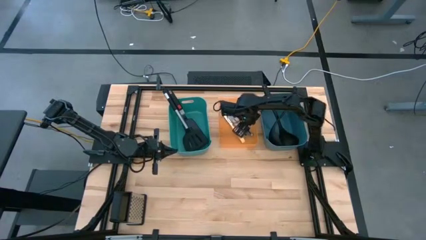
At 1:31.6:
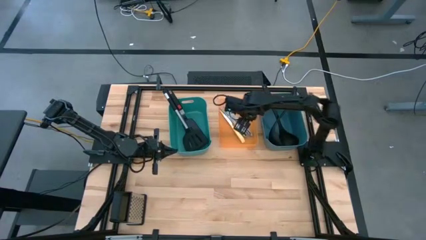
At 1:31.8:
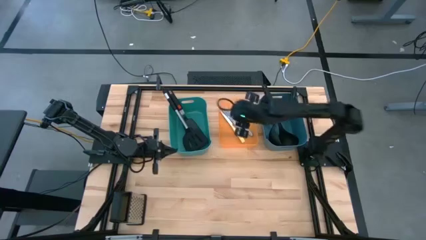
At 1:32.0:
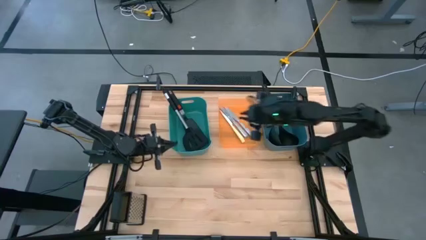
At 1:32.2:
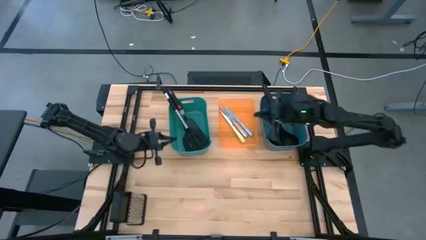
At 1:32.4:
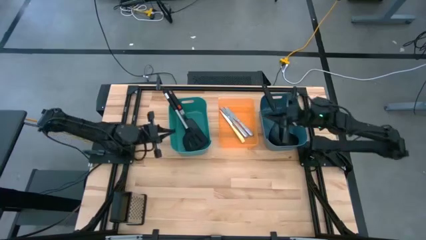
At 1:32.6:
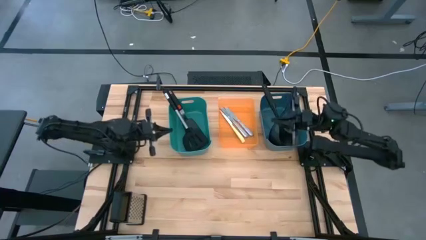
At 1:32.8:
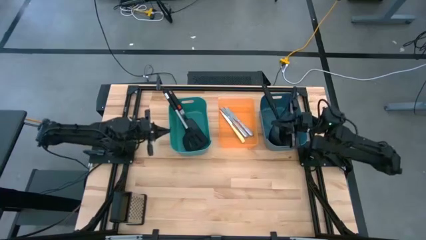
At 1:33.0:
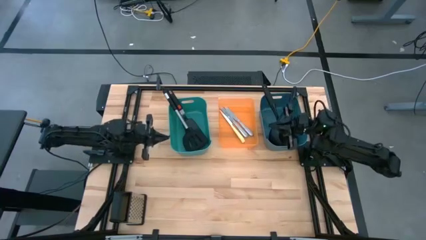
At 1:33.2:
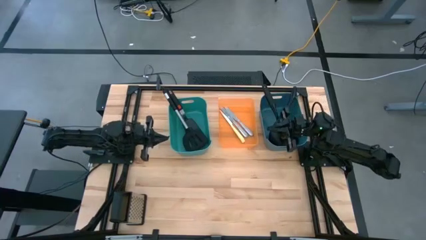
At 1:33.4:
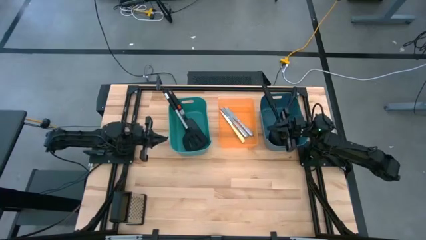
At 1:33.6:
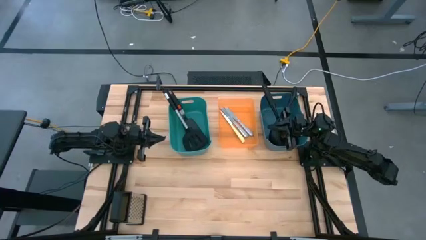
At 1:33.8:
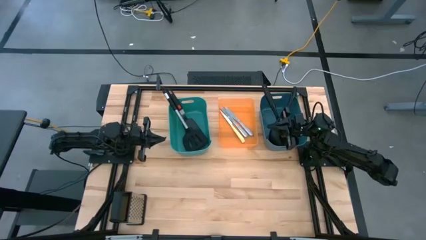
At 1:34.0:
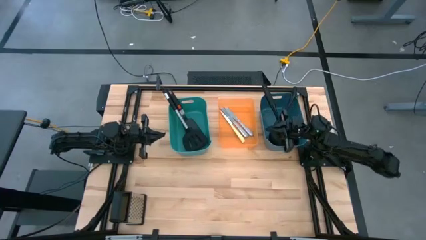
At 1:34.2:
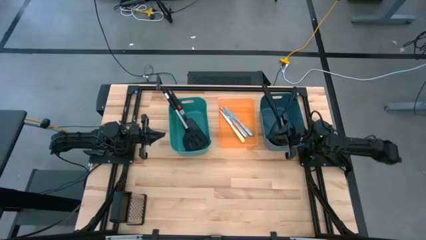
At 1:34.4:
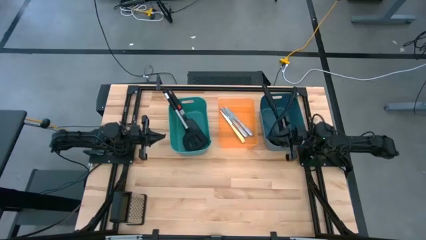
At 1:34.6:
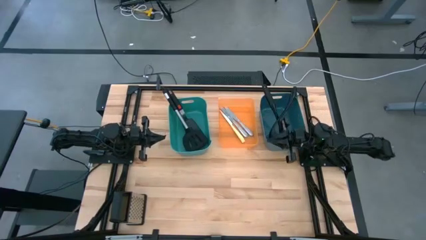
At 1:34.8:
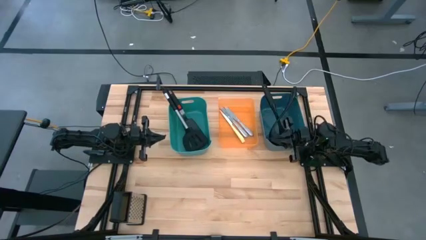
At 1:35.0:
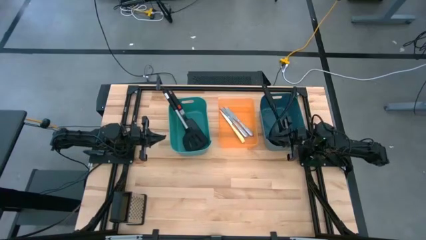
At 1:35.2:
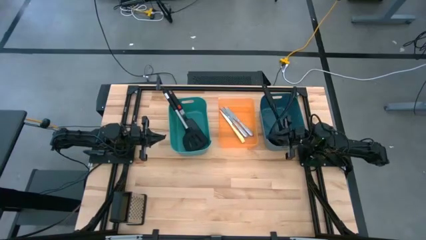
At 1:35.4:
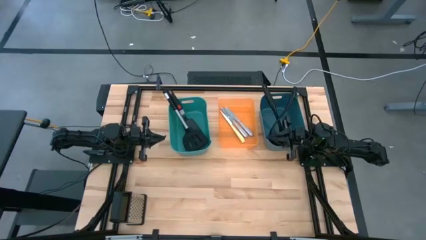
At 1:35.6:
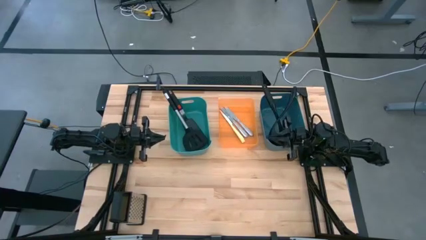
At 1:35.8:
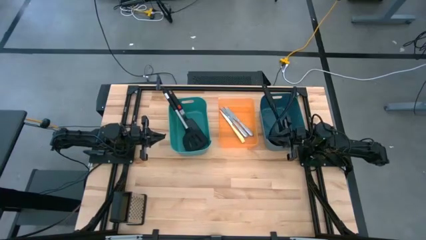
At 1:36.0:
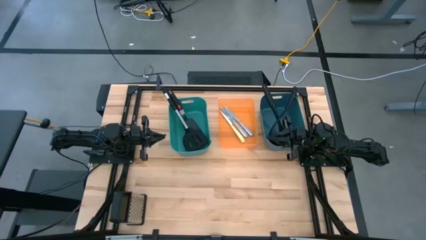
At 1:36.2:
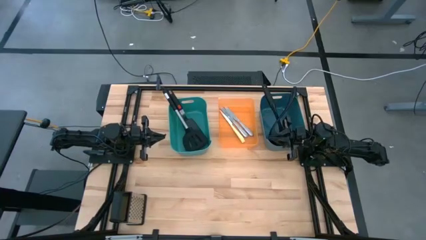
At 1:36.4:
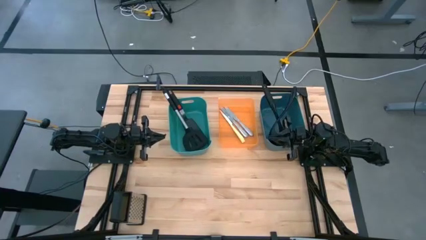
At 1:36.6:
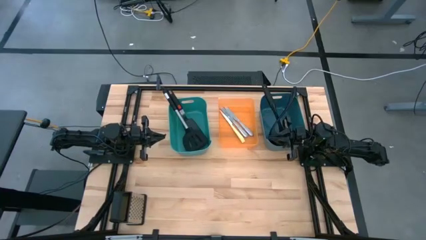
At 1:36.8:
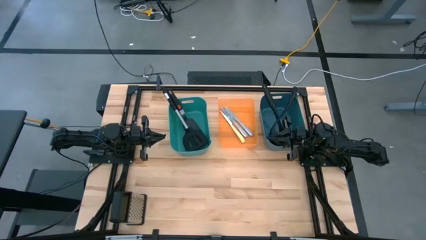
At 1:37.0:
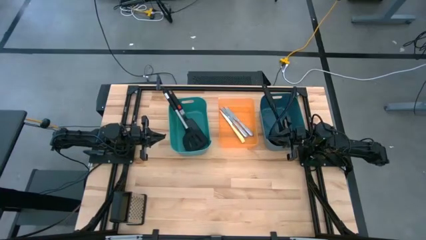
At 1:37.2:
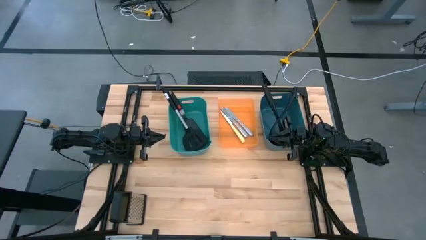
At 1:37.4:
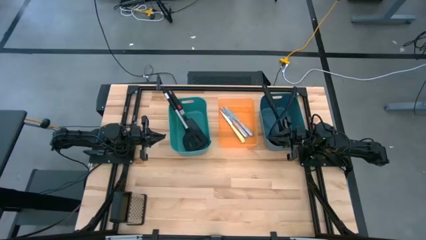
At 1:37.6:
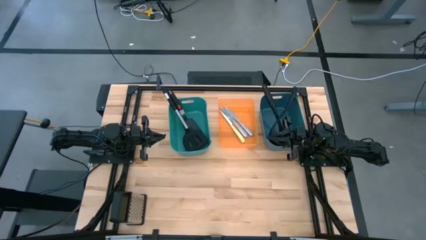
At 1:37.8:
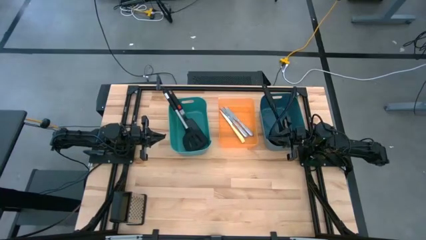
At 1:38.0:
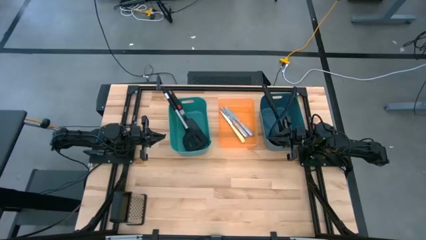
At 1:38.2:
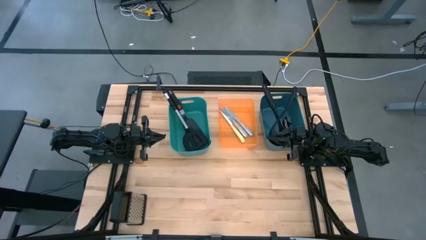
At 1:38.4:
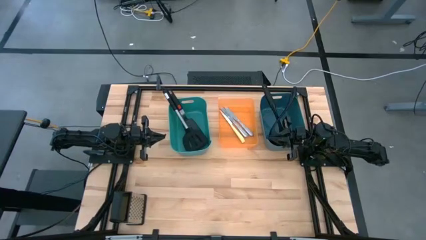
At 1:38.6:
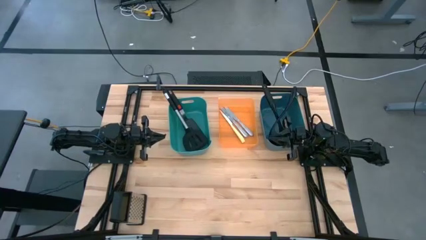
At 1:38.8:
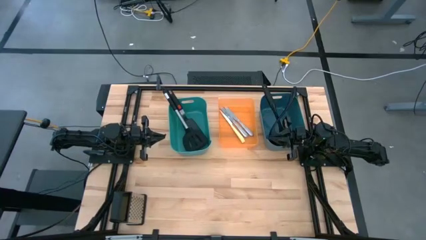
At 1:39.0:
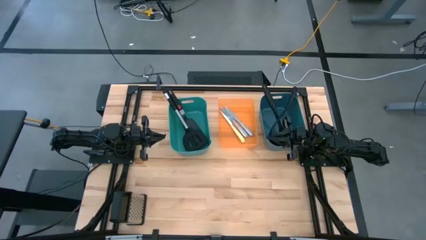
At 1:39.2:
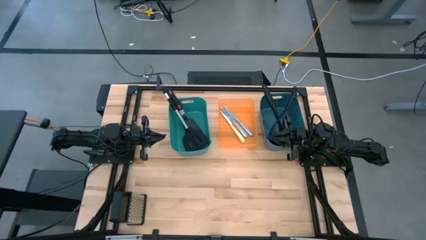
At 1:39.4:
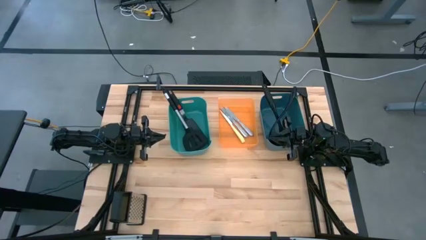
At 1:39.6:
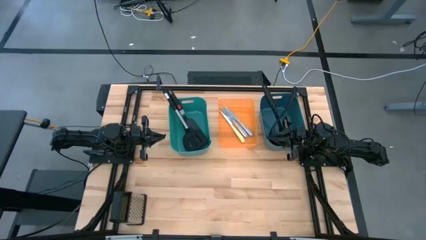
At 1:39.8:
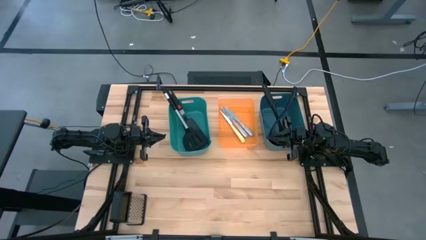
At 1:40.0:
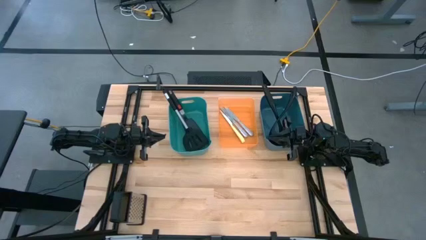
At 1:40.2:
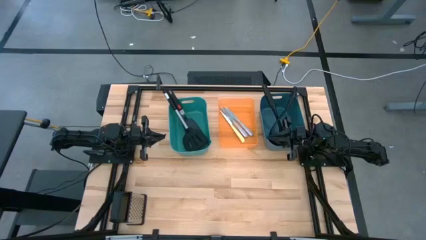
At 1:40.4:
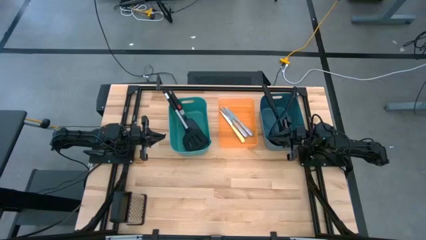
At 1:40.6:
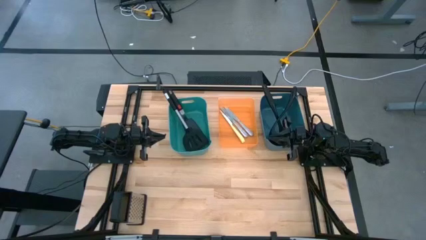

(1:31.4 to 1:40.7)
Task: Pick & Place Kitchen Items
Return to Home Position

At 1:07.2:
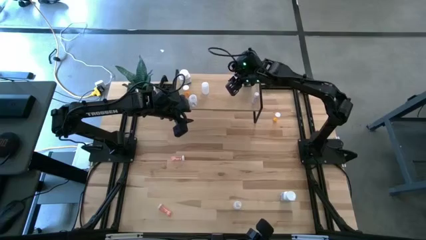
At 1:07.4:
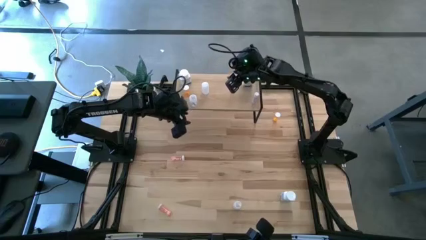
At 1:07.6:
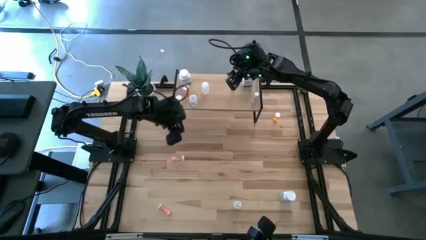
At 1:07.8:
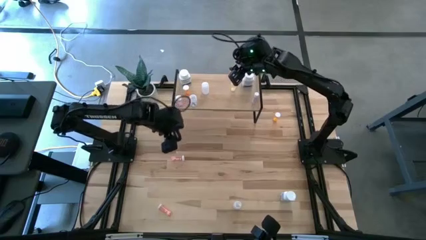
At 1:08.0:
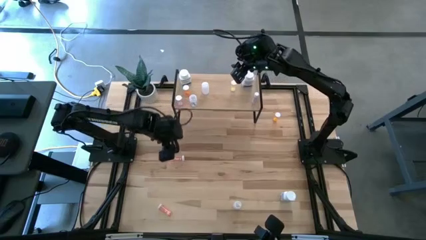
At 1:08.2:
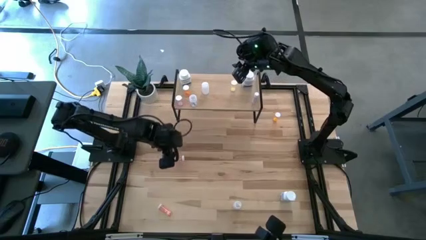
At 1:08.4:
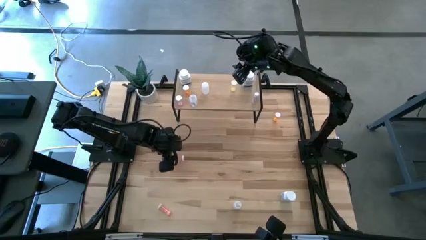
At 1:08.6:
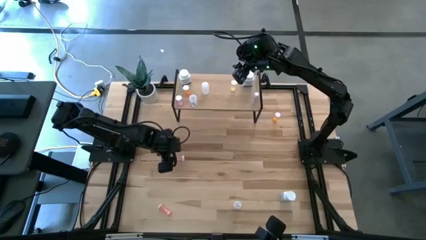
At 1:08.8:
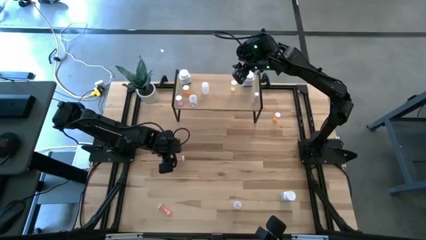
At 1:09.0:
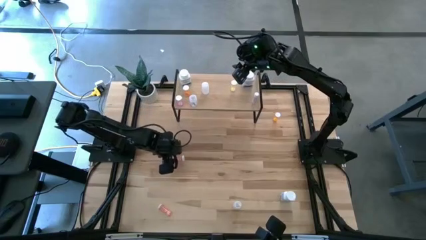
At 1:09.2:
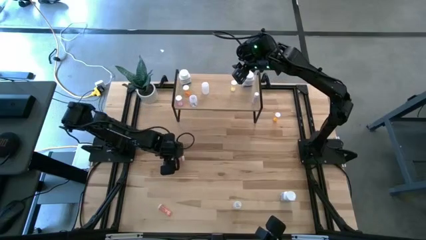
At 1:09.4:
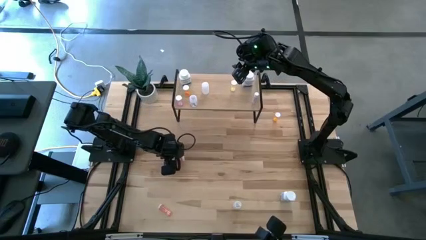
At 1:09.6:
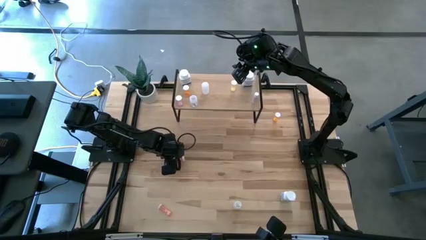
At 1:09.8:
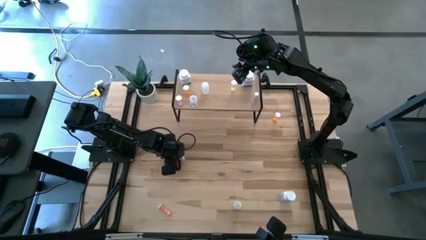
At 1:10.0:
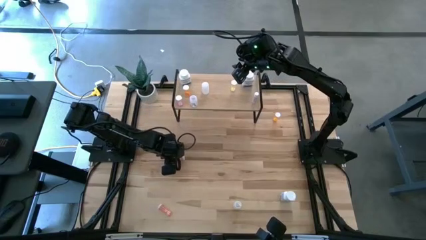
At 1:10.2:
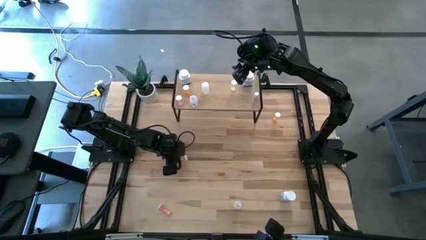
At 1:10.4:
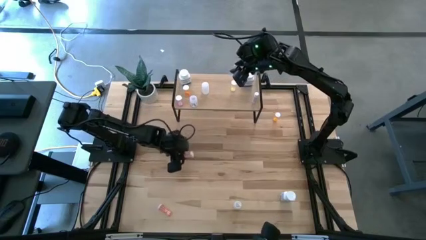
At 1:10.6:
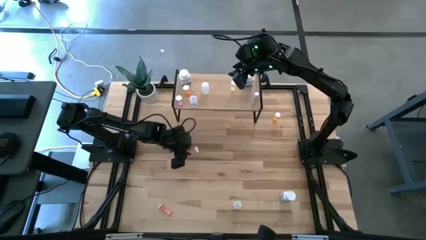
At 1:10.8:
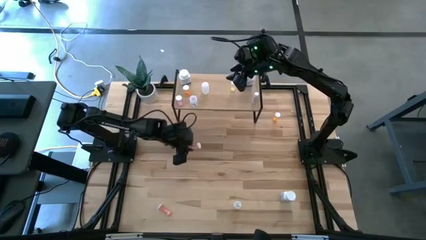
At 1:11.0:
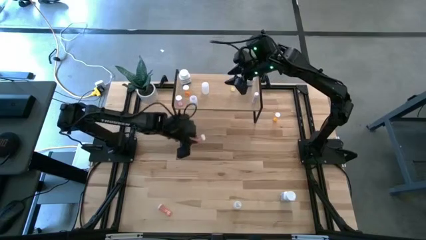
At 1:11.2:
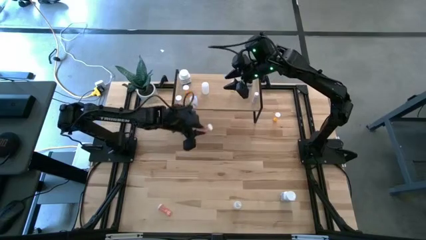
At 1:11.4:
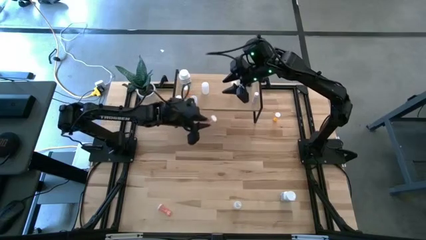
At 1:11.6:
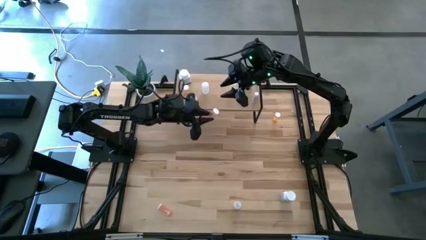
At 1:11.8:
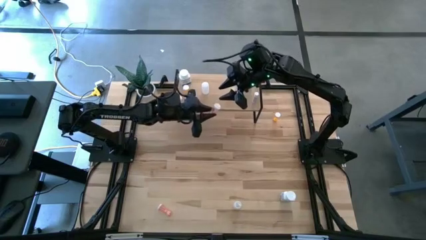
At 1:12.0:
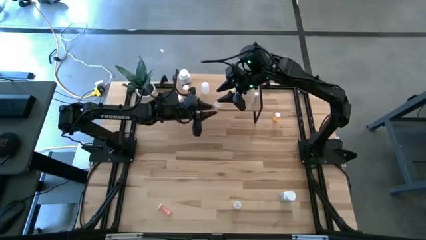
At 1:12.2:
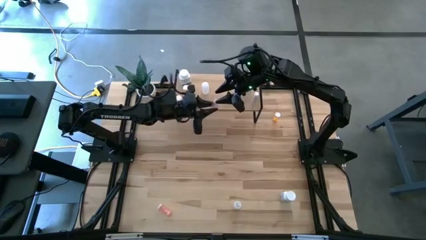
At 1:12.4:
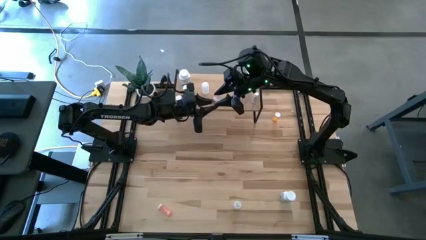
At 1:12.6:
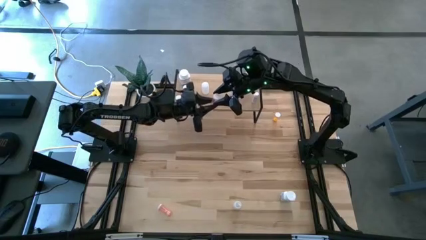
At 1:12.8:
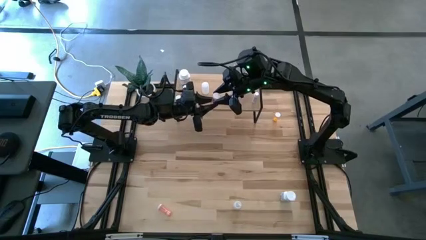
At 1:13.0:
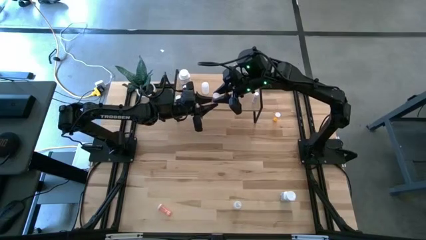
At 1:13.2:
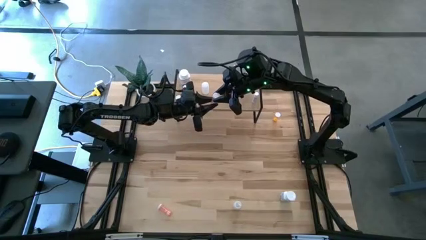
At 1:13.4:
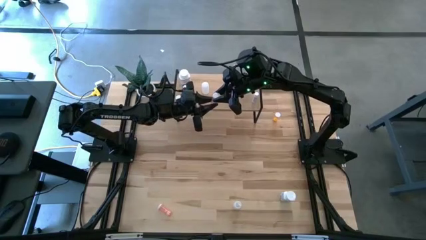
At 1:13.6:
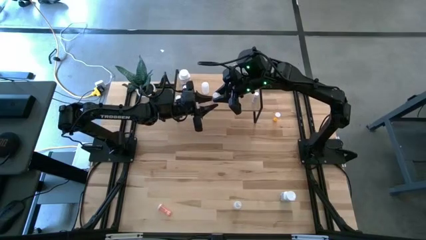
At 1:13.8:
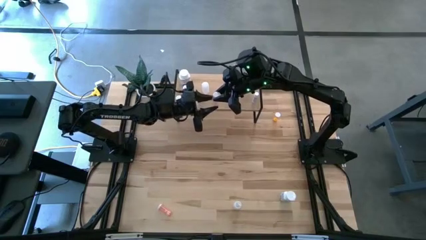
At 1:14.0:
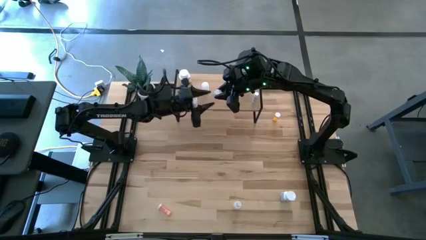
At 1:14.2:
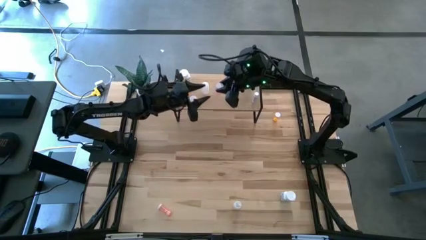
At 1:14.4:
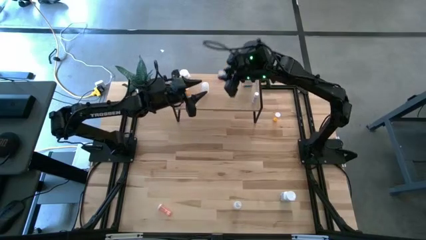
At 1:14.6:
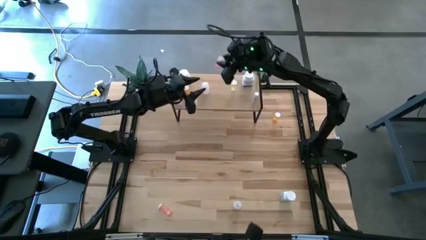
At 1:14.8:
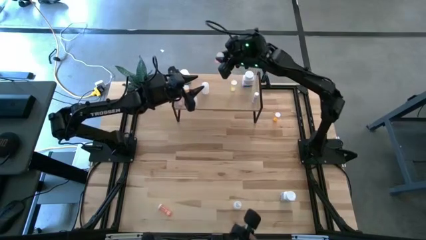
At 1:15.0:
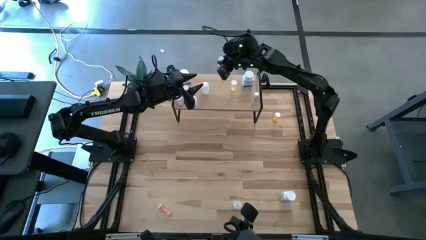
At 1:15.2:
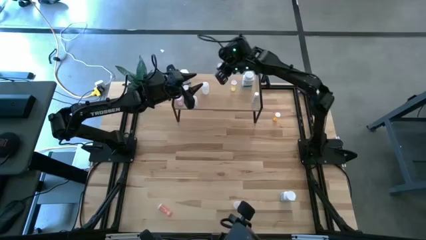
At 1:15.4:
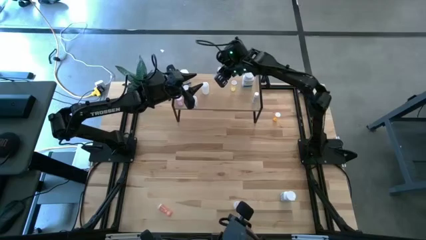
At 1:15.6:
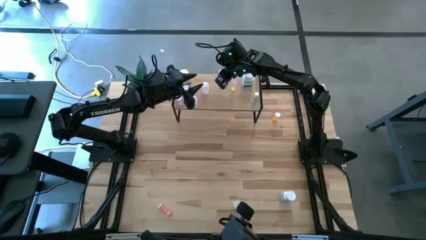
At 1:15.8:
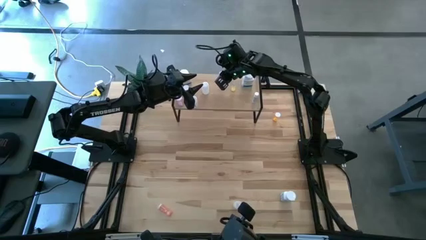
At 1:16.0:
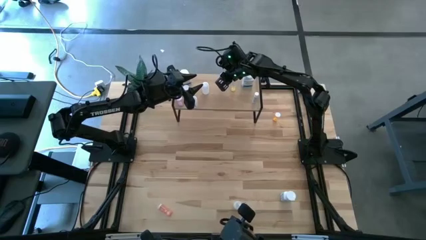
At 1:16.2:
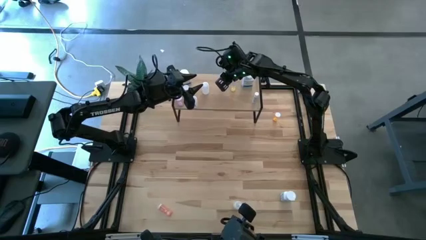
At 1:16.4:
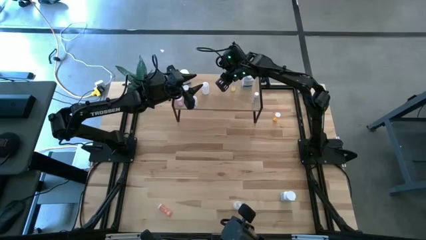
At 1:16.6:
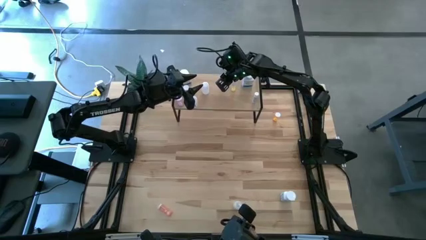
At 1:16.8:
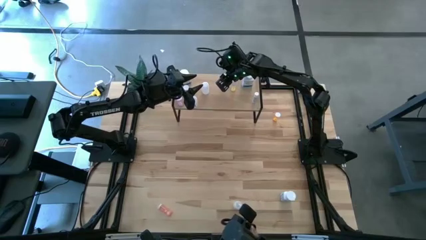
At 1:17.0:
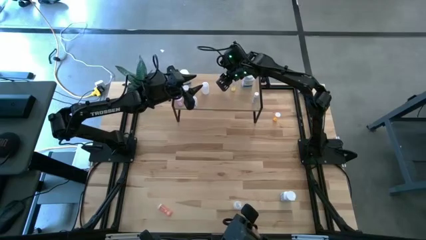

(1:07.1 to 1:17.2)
Task: Pick and place medicine bottles onto shelf by color
Put the top pink transparent pill bottle on the shelf
